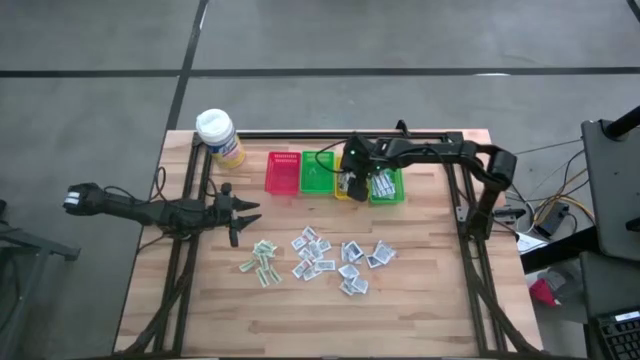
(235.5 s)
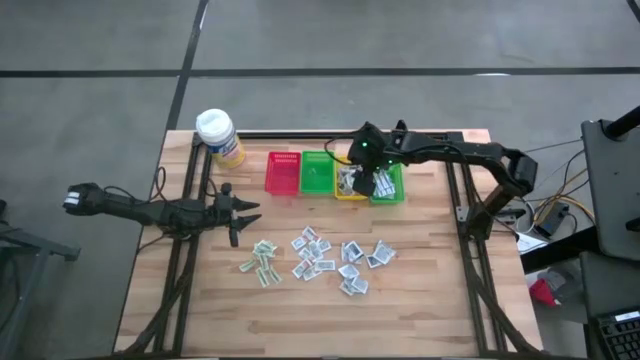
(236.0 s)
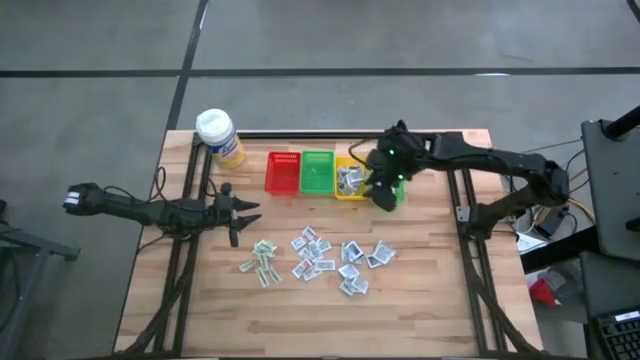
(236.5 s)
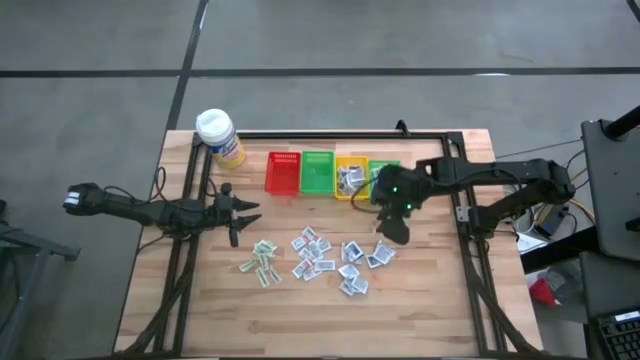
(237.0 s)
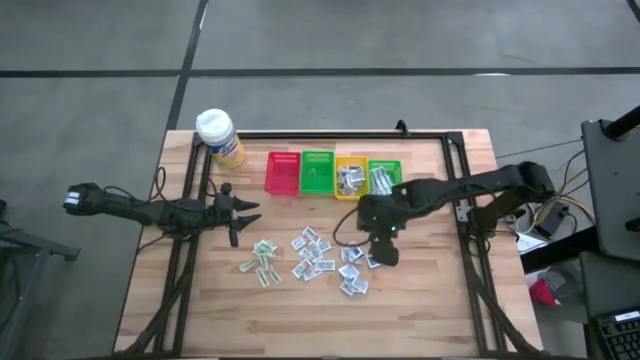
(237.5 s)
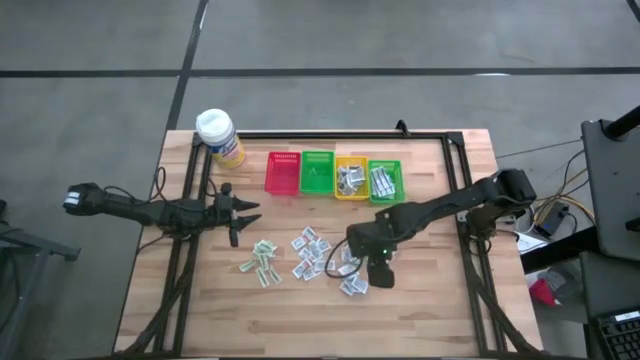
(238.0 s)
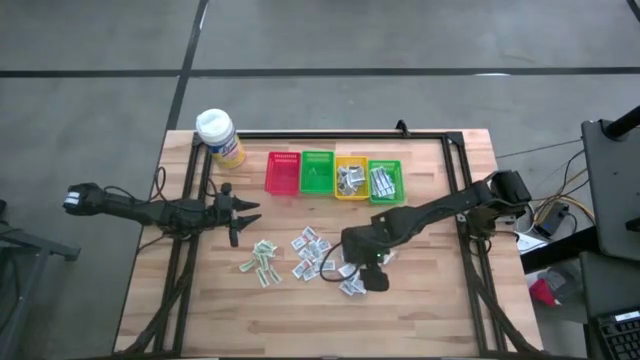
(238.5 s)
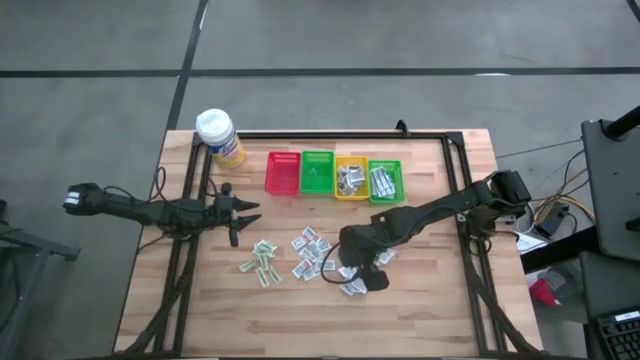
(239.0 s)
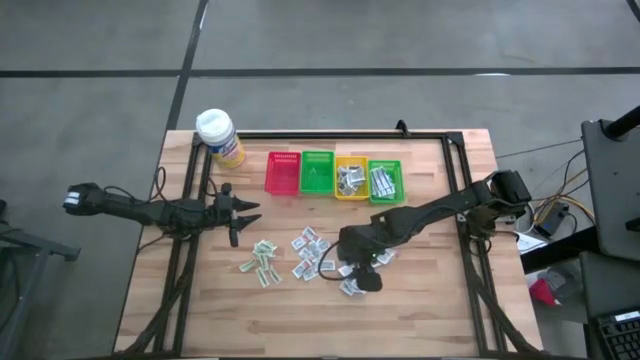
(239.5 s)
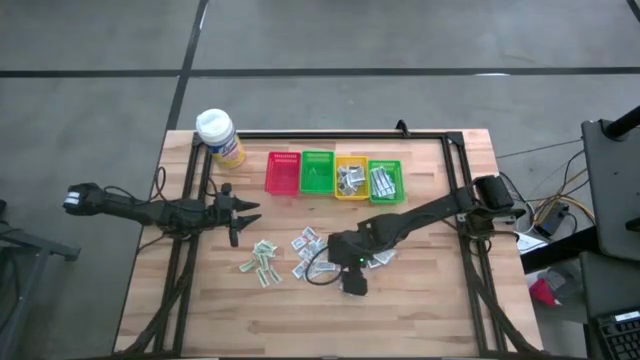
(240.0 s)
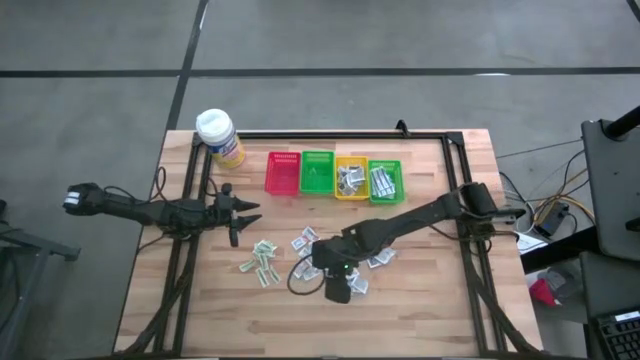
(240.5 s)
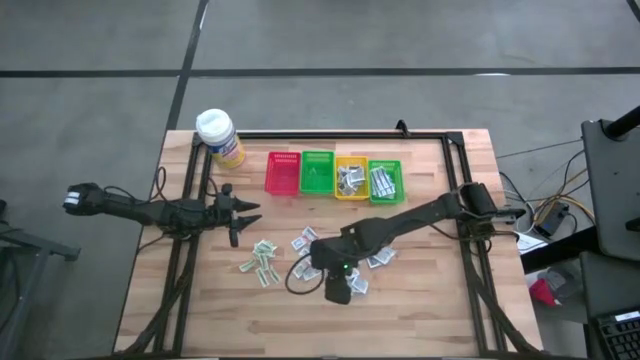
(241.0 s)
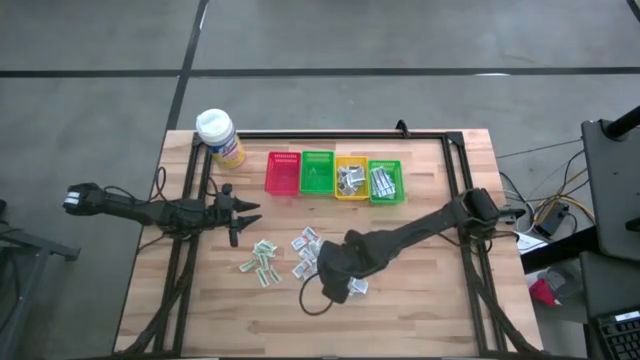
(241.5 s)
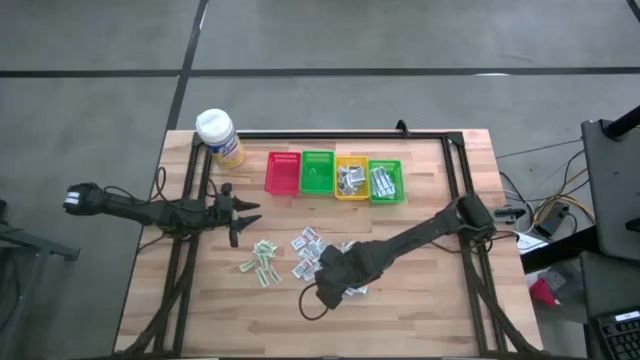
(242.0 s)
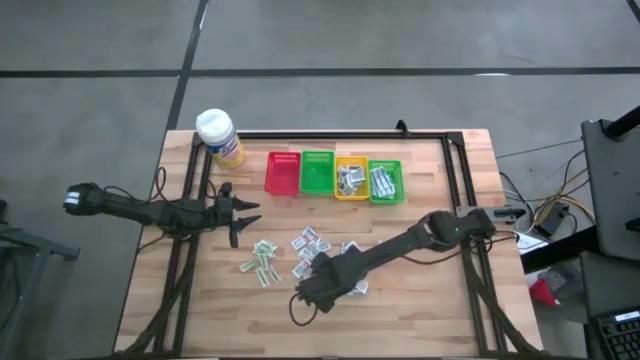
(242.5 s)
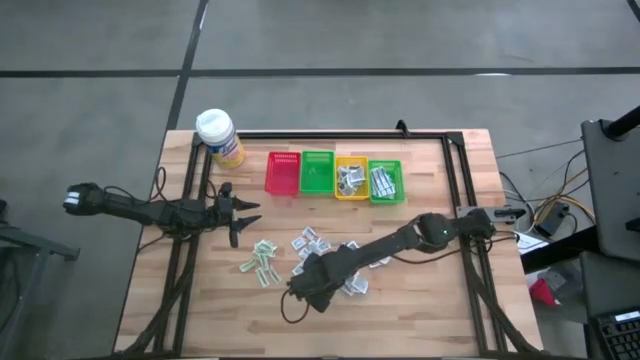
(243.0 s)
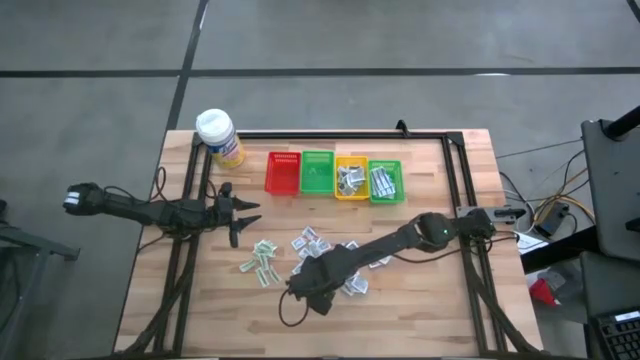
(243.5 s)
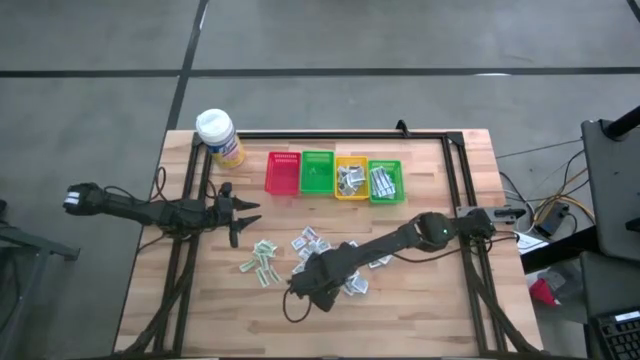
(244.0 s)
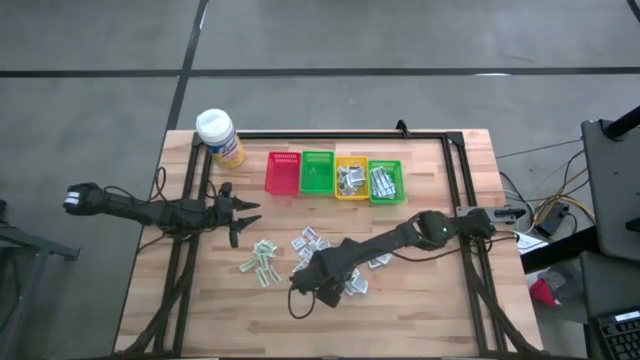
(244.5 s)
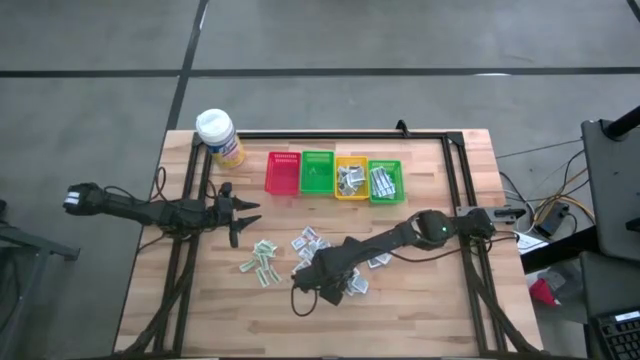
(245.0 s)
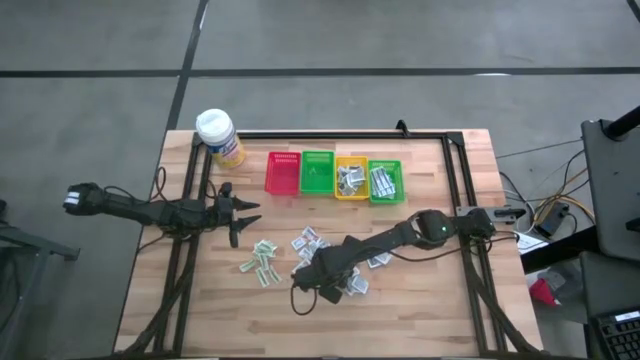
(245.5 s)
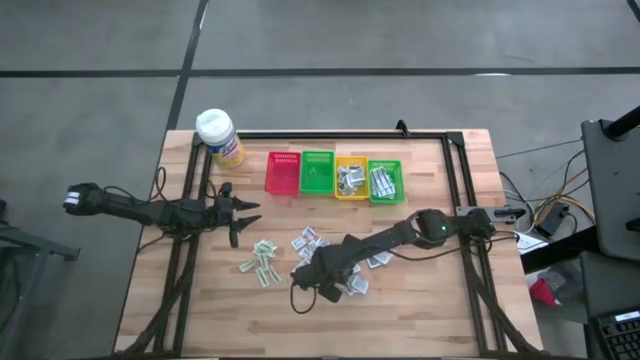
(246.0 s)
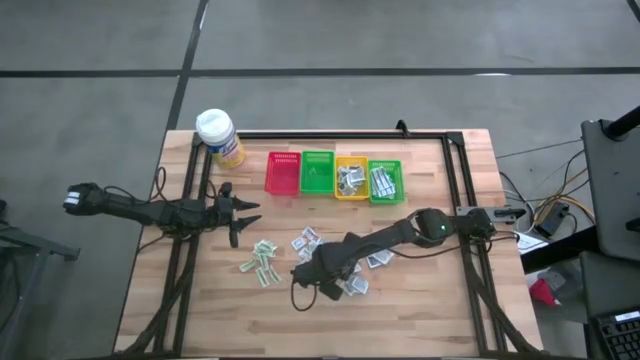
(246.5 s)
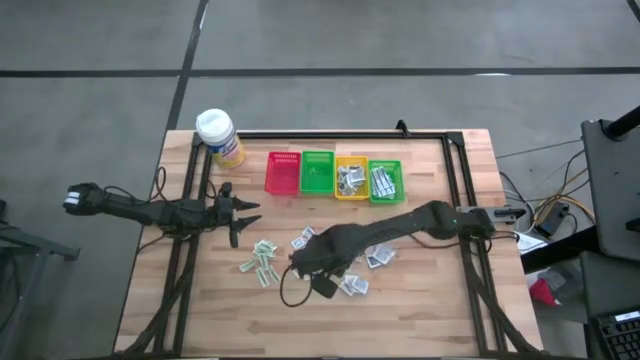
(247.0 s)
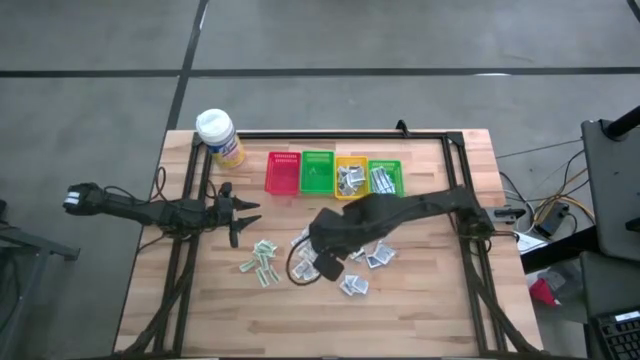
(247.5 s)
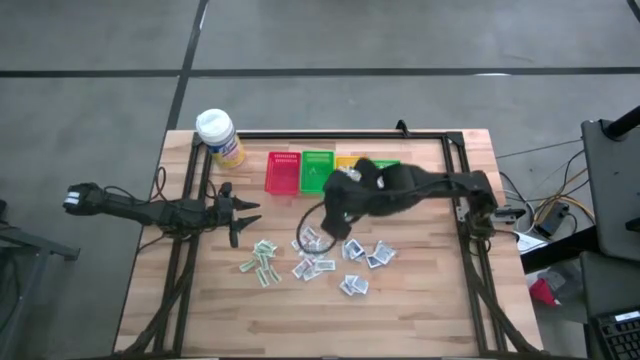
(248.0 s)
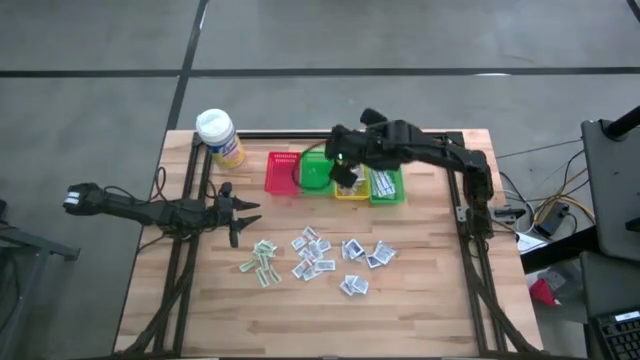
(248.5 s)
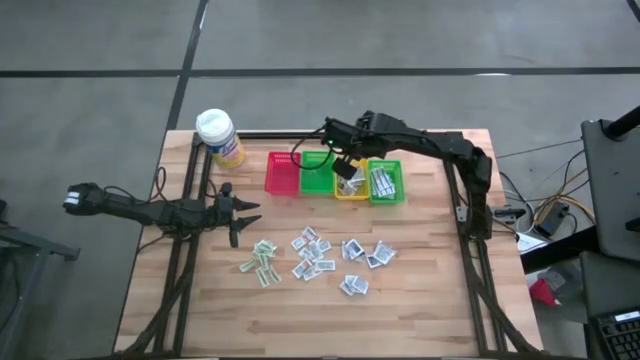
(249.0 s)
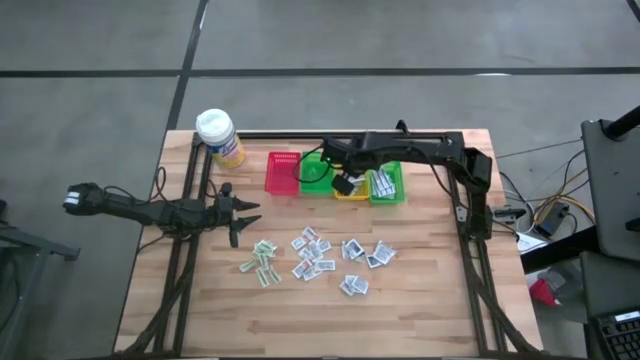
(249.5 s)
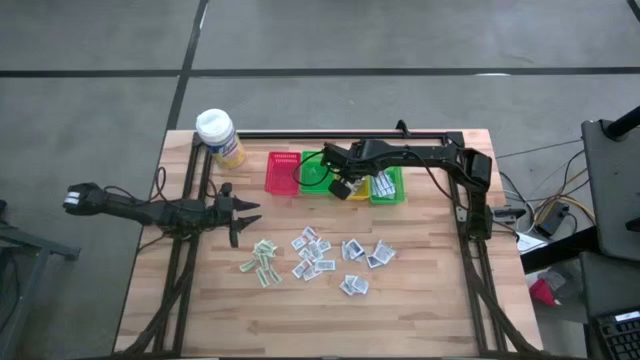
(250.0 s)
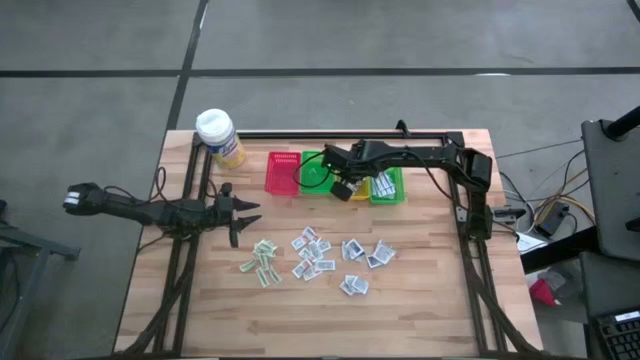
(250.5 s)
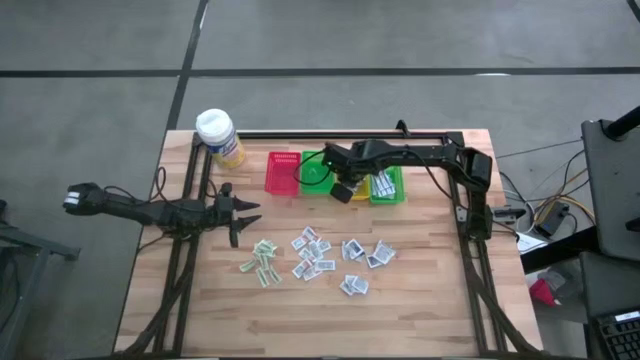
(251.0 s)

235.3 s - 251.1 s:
Task: Pick & Place First Aid Supplies
Put the blue alcohol pad into the yellow bin

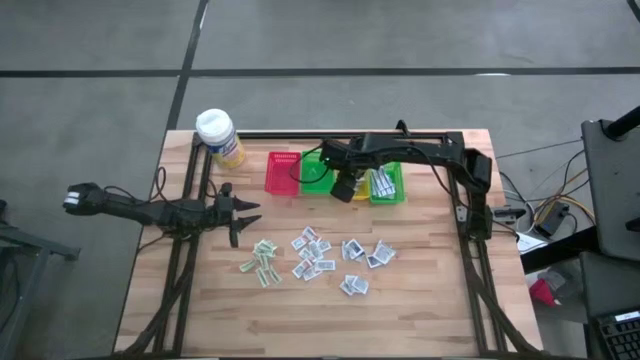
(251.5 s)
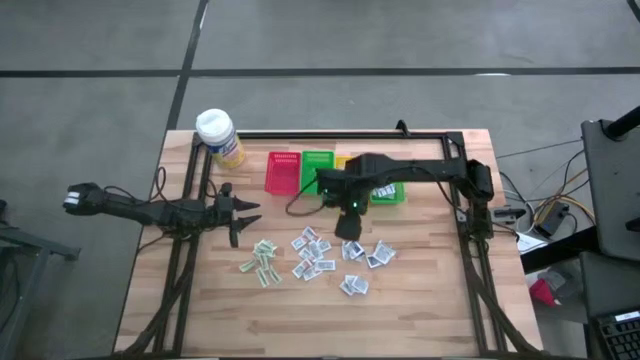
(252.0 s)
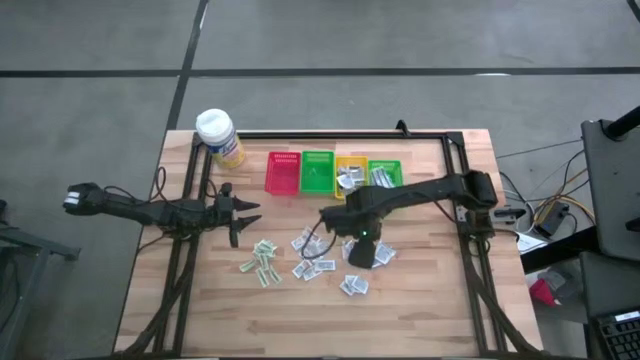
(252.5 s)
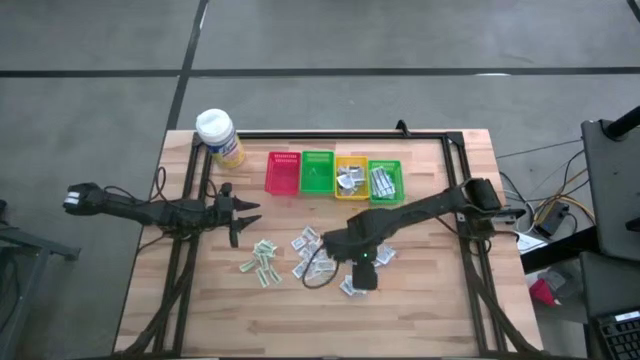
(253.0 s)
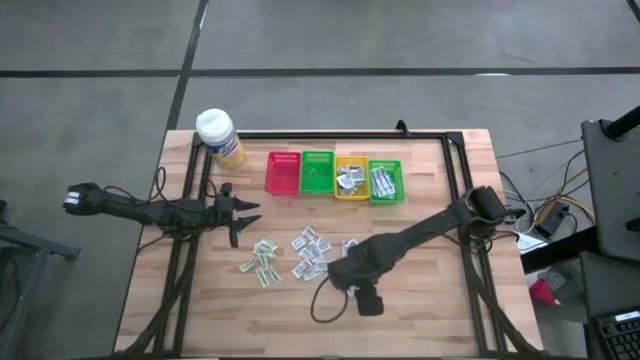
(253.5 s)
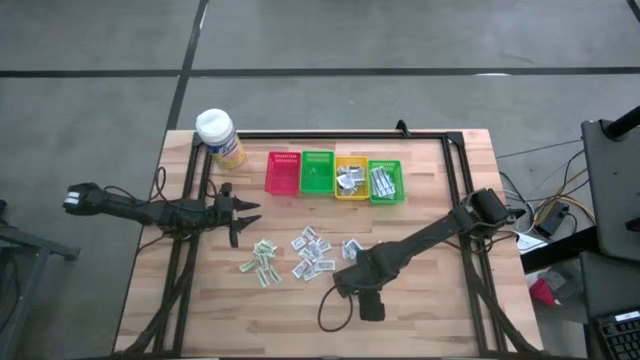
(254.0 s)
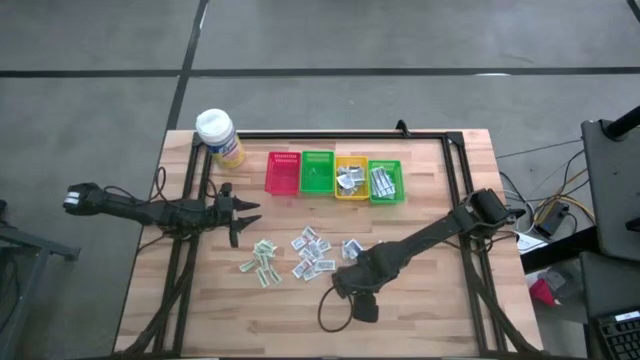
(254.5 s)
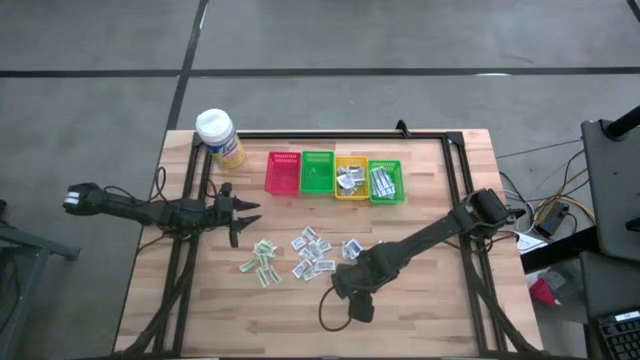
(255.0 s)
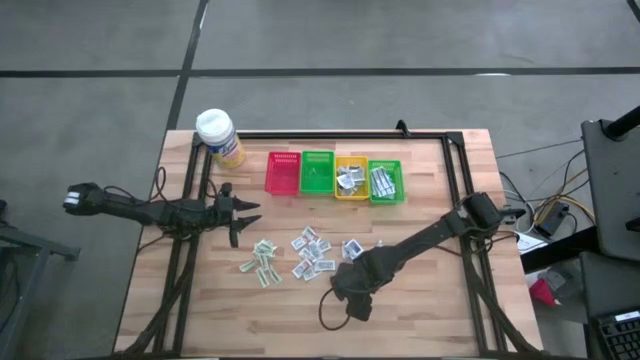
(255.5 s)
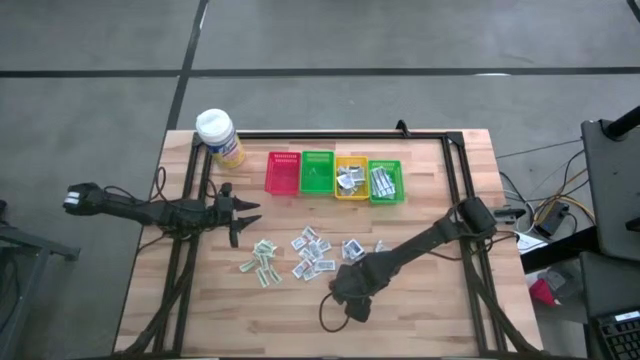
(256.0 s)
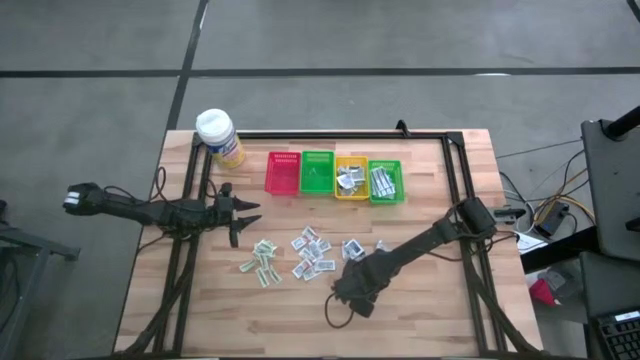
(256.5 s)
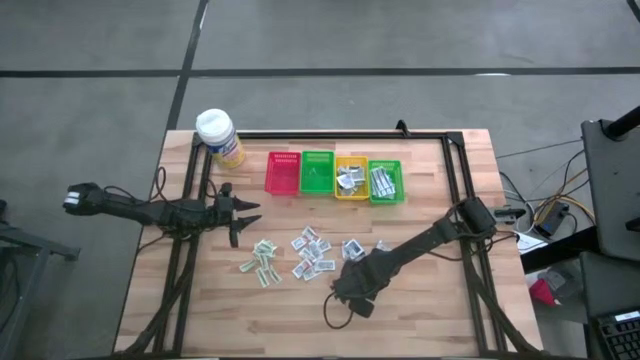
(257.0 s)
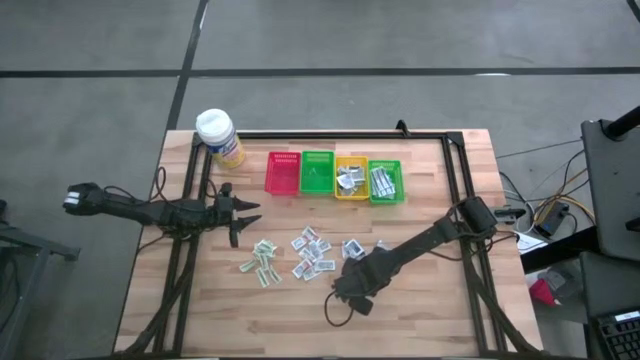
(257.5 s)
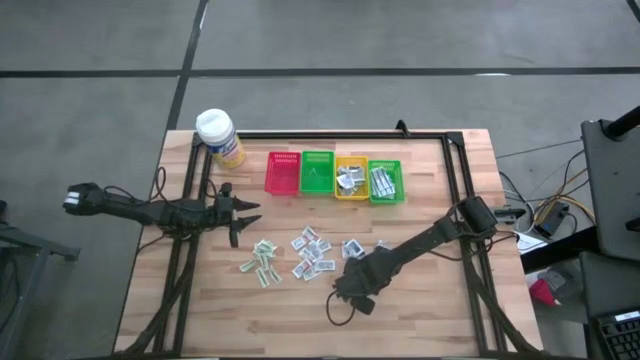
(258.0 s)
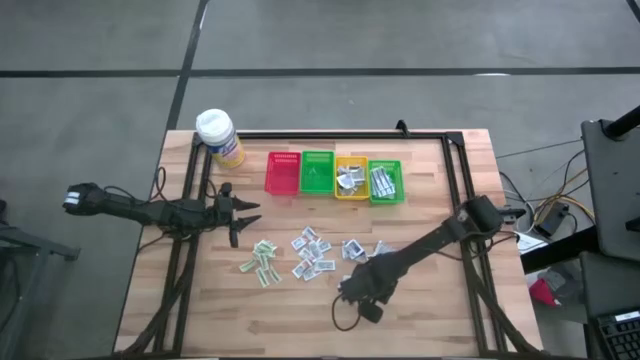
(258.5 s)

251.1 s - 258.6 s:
Put the blue alcohol pad into the yellow bin
